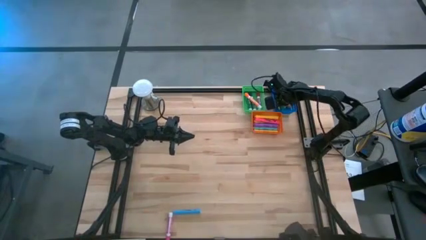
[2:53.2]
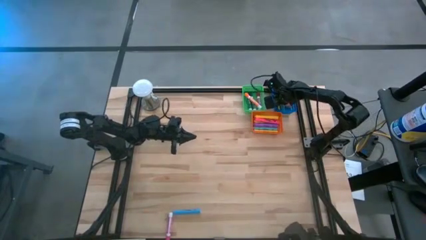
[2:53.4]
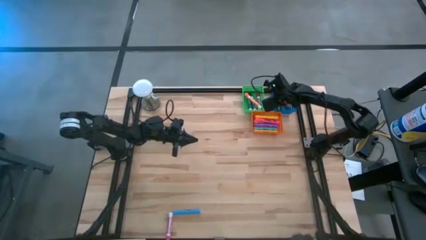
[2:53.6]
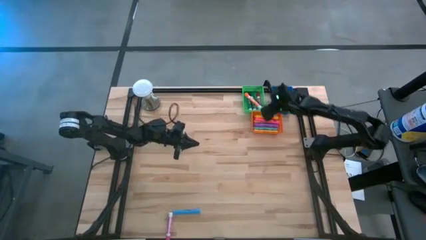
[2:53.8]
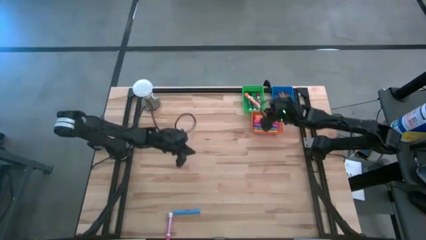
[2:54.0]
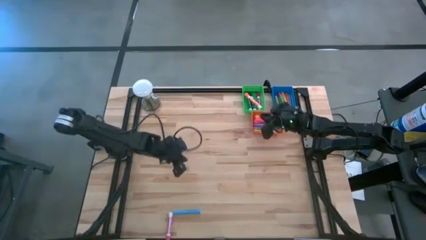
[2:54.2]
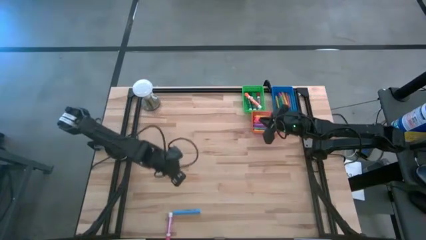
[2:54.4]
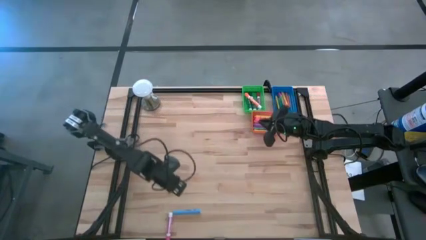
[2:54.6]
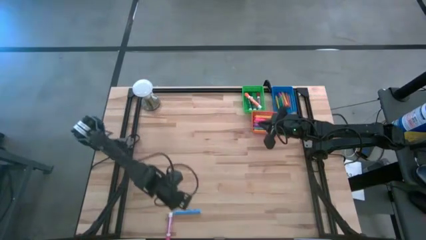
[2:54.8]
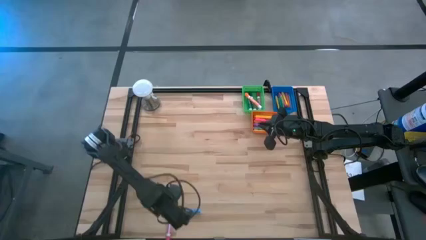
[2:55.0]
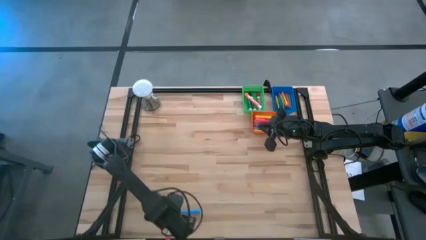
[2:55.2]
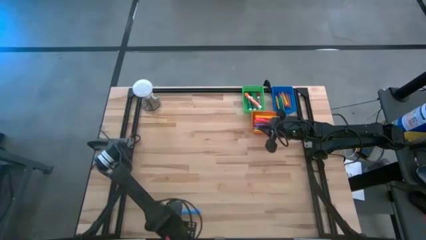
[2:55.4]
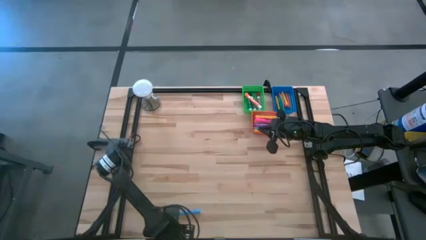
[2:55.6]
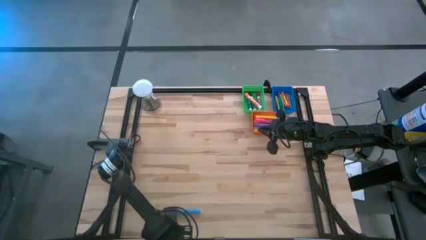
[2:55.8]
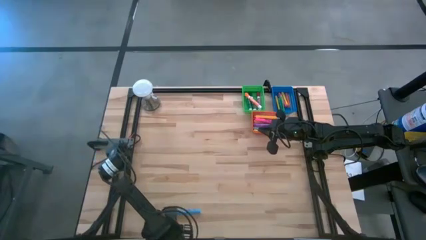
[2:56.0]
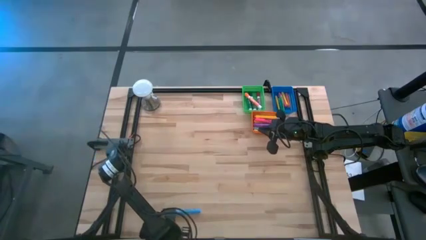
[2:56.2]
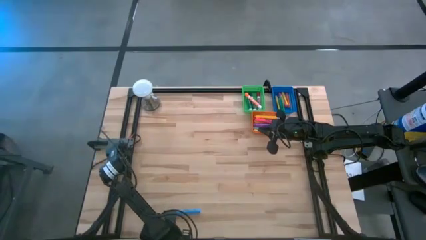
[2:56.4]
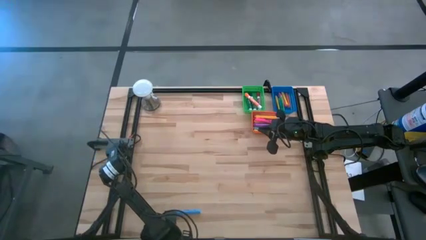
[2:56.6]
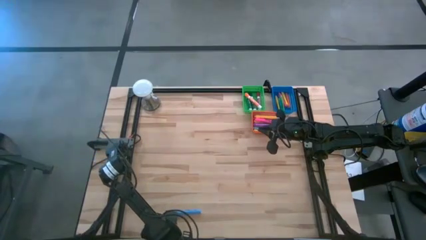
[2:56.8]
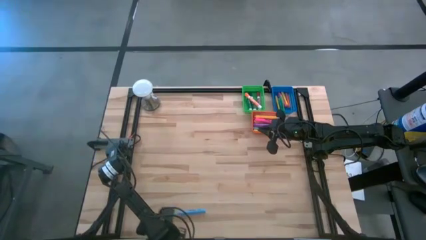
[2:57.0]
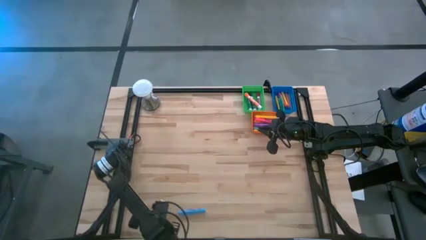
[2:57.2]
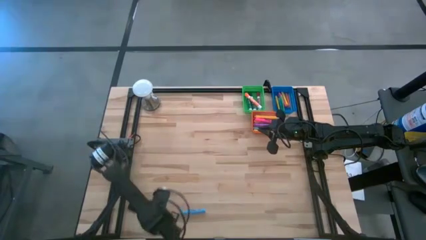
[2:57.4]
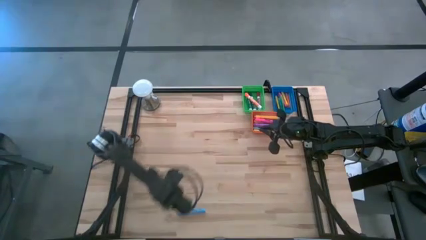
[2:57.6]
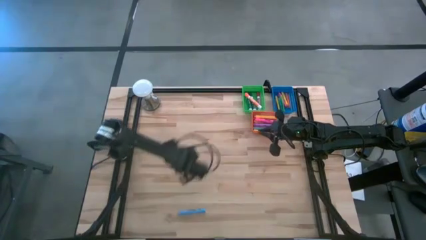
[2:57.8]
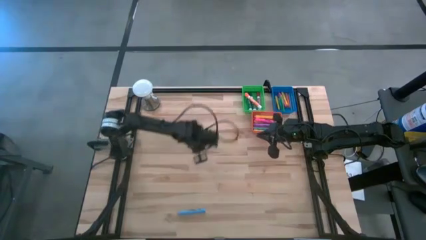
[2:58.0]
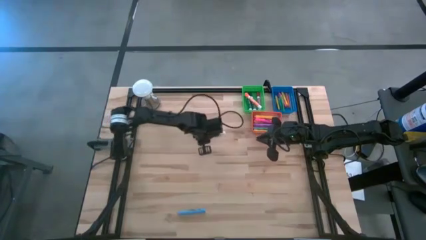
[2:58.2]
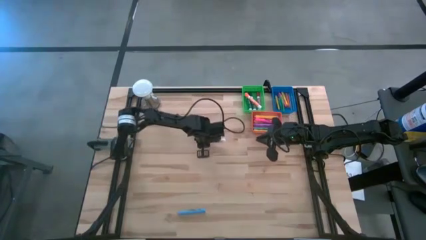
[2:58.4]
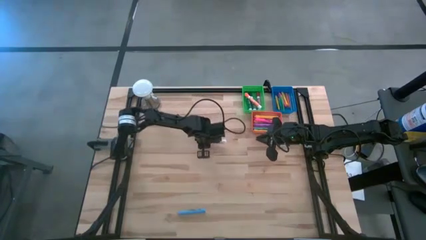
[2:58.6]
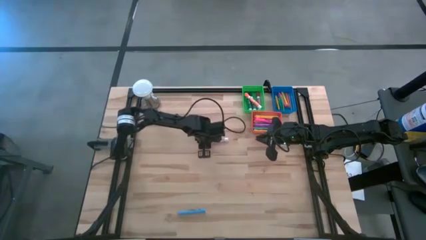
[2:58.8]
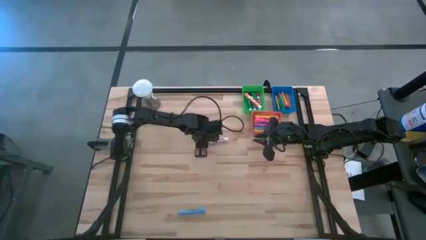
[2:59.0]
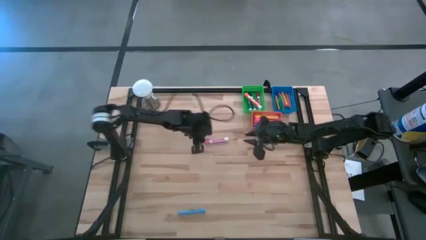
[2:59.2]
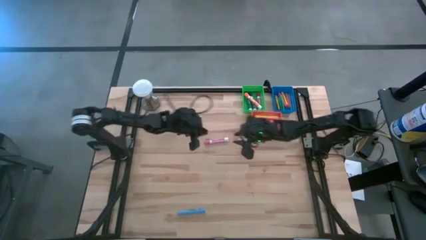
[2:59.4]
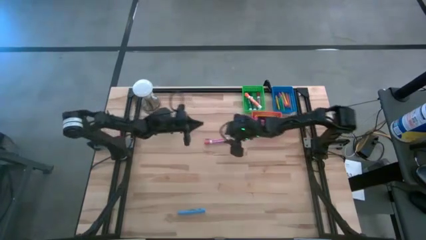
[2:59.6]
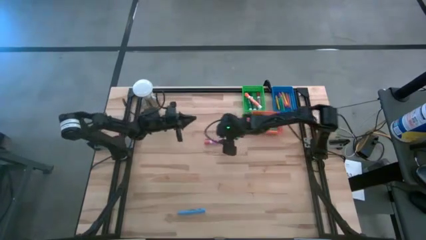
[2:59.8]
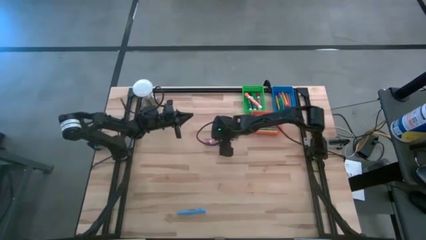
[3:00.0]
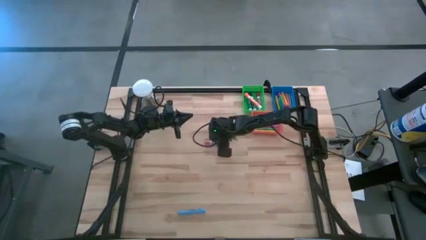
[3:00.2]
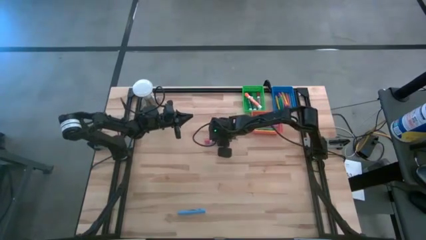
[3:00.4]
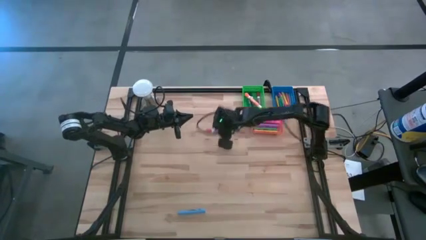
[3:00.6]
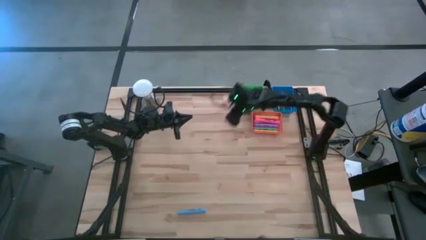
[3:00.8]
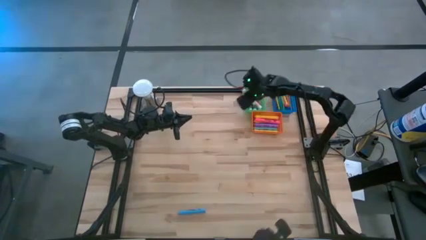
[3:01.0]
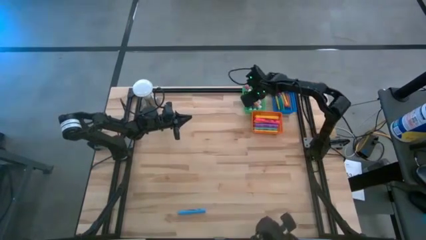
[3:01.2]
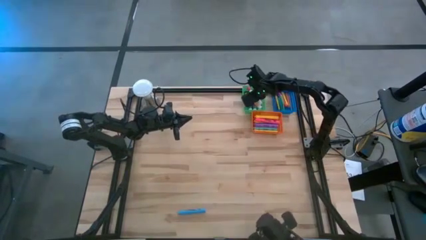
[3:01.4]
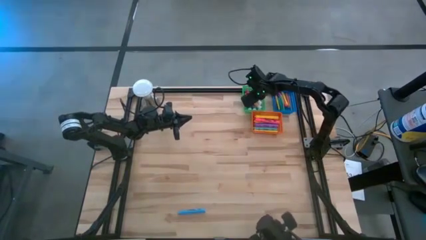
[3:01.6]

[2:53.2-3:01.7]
Task: Pick & Place Markers
Put the pink marker pen into the green bin

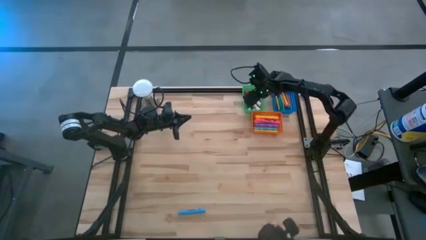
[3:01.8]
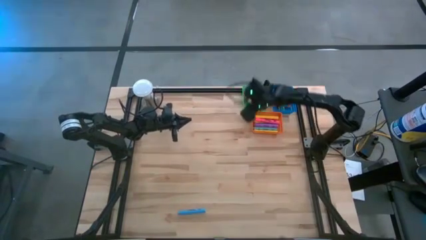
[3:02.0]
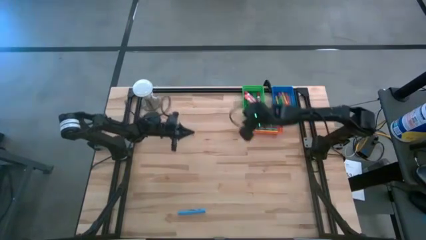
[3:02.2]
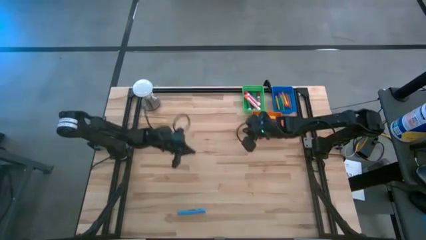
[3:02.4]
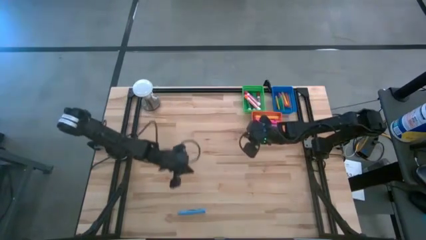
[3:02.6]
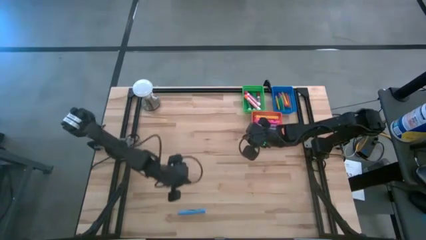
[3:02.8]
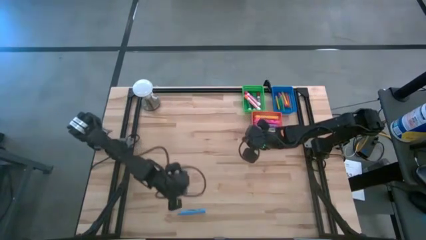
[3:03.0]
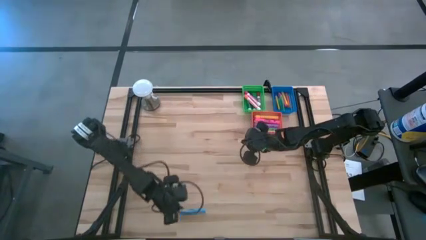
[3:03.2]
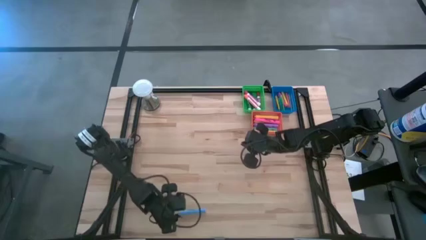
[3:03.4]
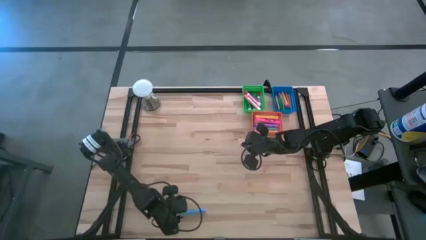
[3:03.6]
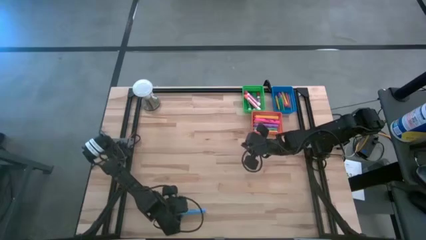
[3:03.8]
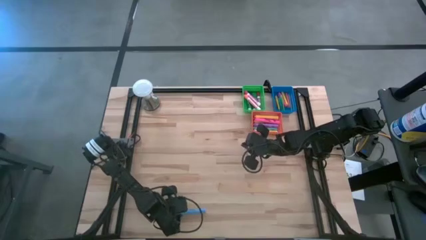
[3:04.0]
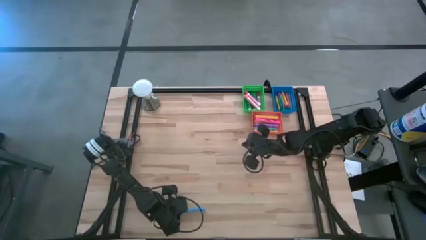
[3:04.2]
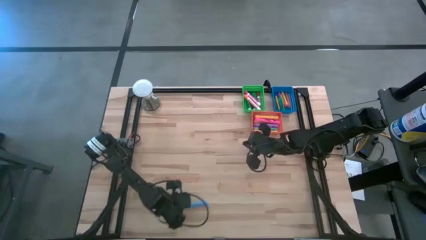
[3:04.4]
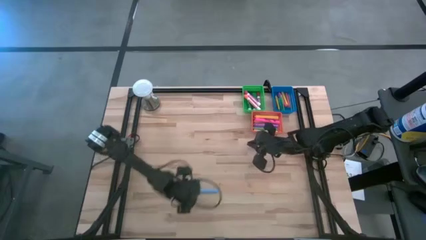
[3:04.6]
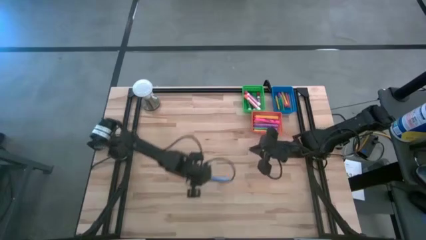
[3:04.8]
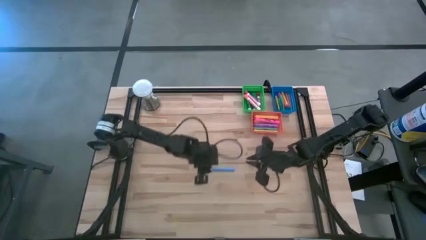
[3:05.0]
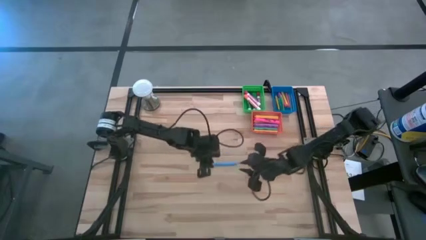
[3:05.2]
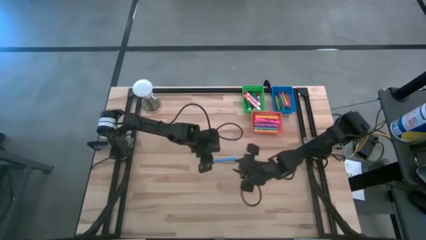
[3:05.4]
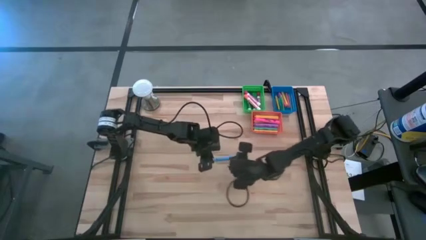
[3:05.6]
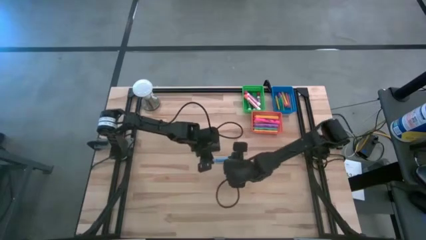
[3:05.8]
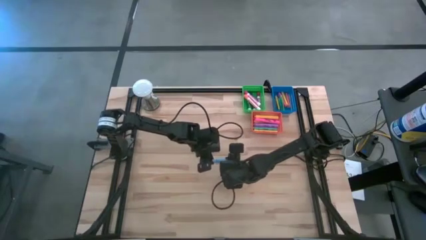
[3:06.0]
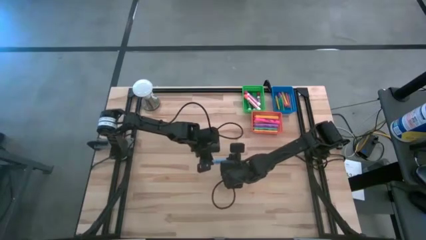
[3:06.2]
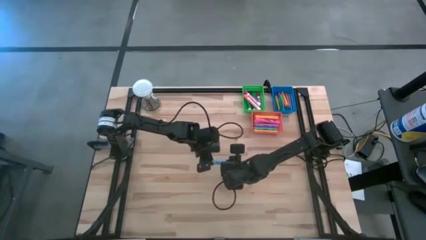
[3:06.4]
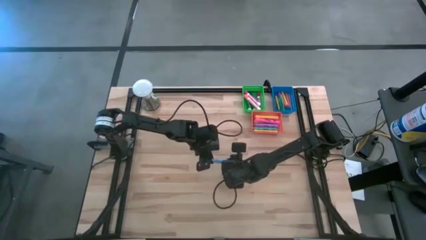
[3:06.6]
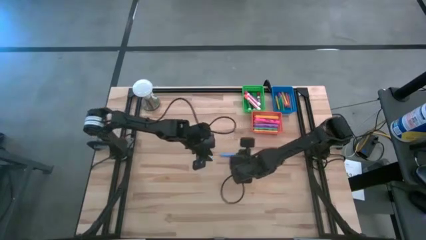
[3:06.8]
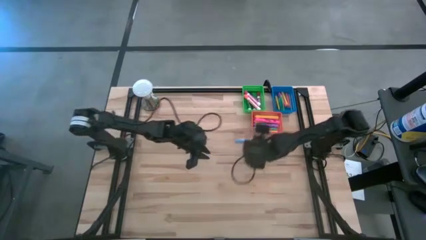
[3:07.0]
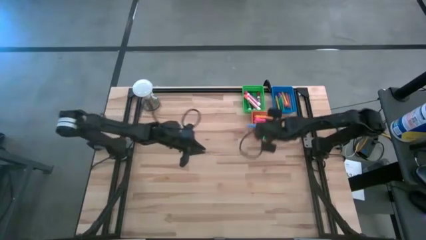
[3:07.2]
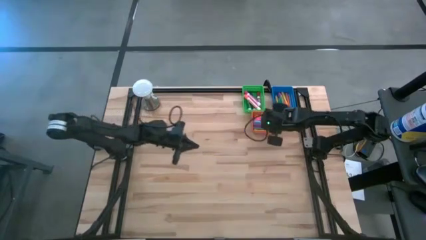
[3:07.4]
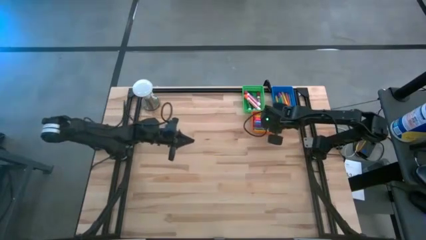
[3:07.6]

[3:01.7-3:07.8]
Put the blue highlighter pen into the orange bin

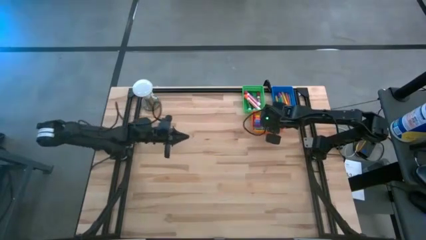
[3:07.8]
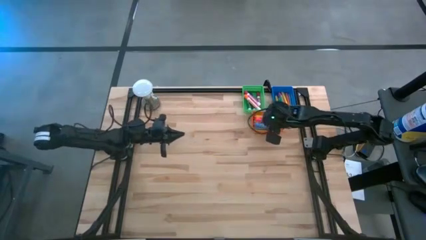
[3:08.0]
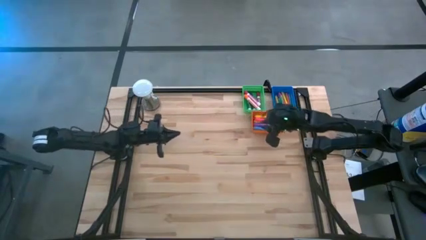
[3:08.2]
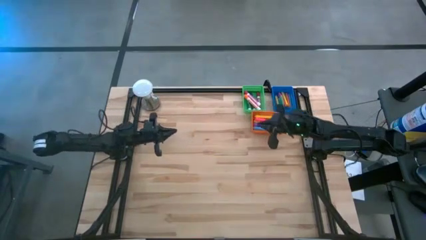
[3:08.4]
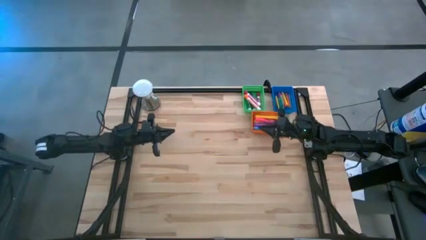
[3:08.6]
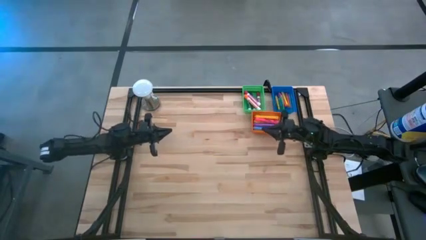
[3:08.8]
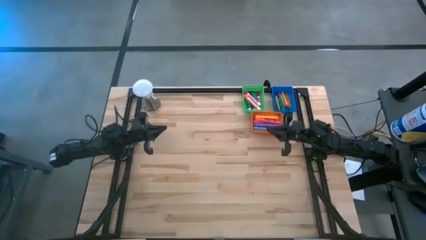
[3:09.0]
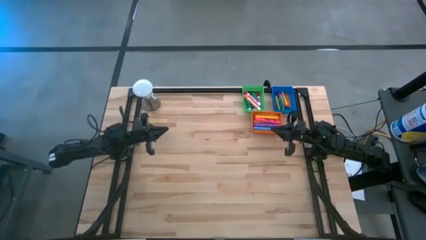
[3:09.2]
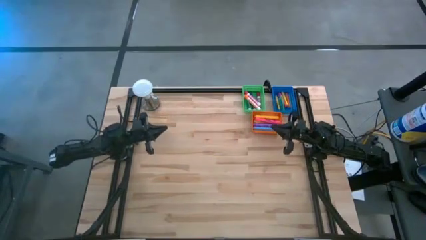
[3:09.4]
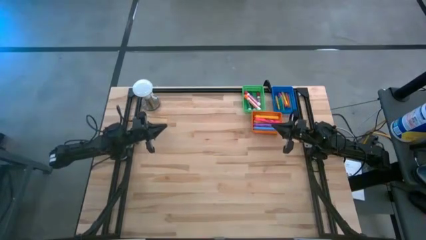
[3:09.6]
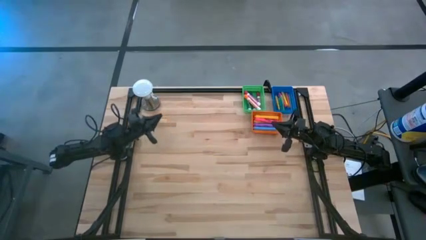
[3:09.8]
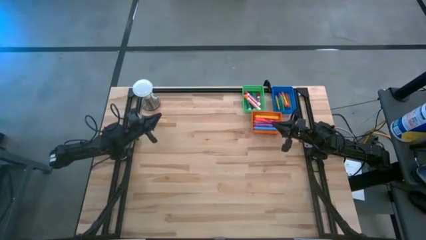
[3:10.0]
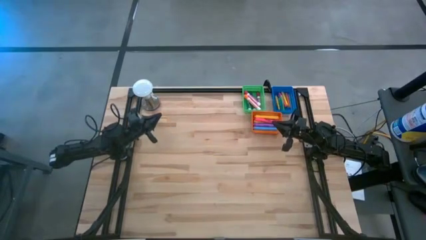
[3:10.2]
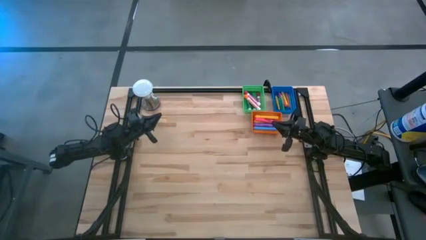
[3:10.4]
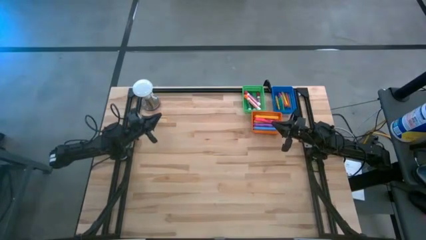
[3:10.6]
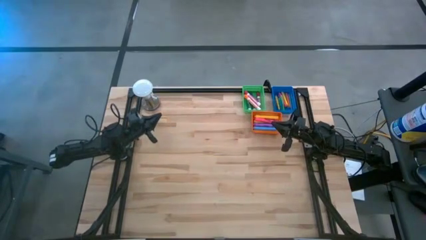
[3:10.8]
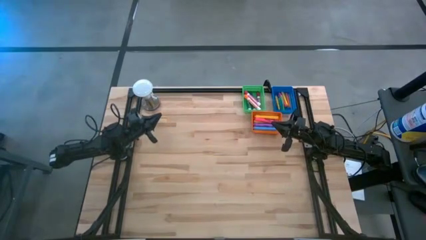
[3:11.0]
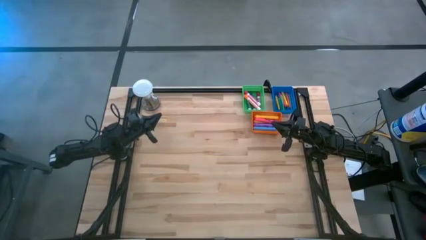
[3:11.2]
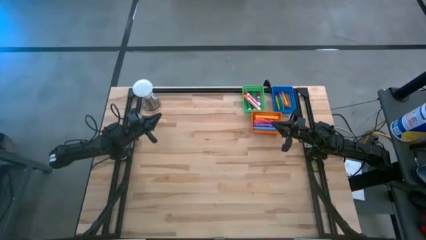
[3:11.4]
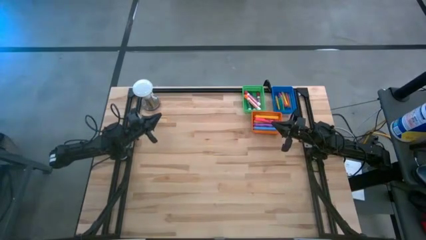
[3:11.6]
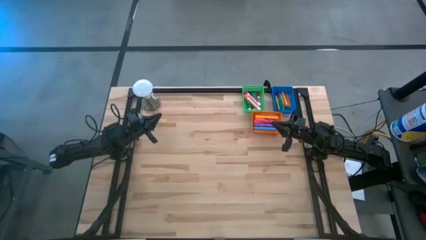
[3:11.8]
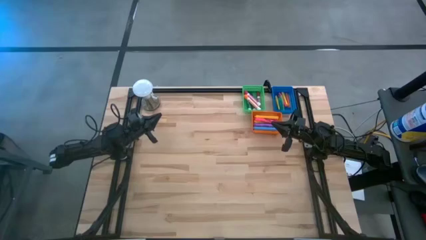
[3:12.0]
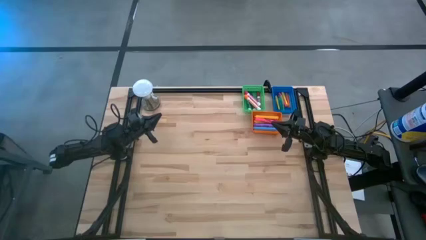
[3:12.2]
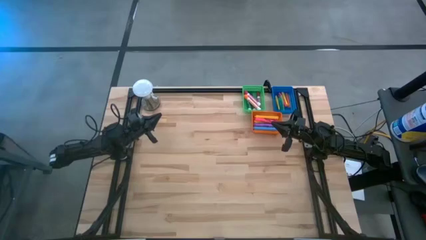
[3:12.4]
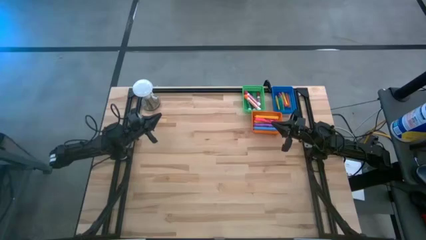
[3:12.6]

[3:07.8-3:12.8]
Return to Home Position
